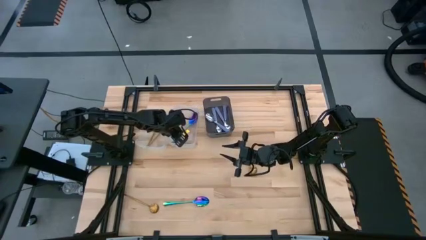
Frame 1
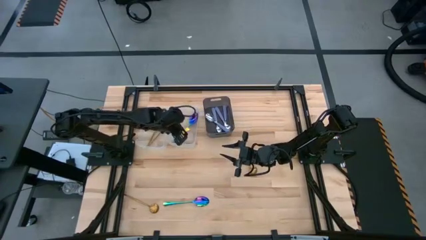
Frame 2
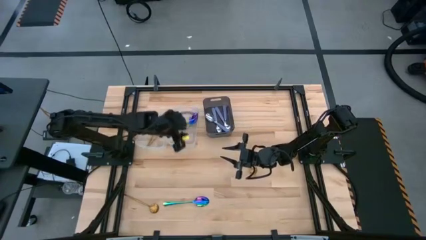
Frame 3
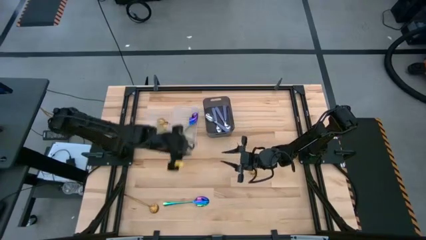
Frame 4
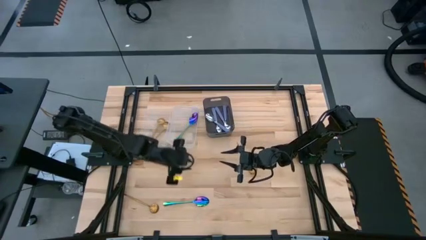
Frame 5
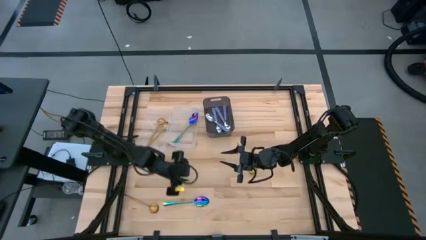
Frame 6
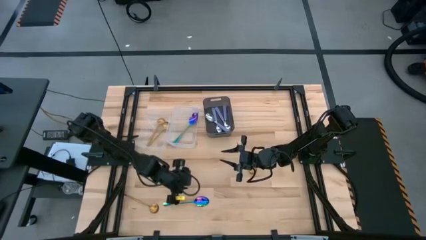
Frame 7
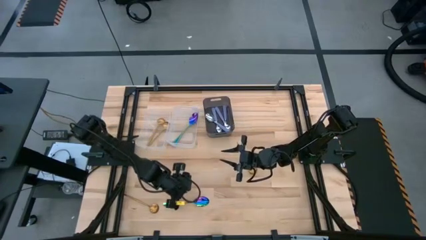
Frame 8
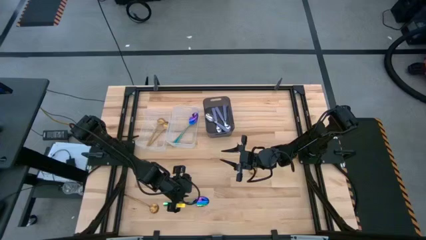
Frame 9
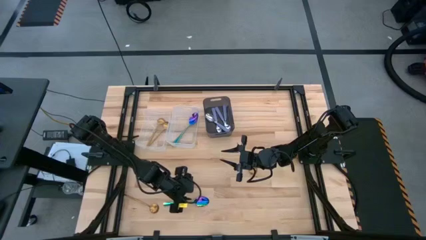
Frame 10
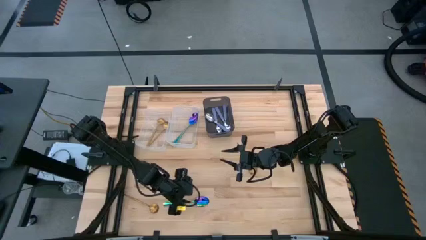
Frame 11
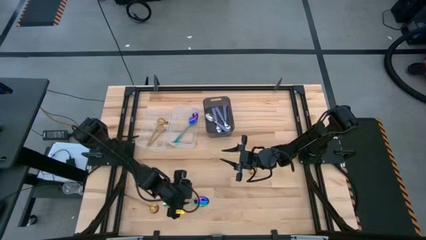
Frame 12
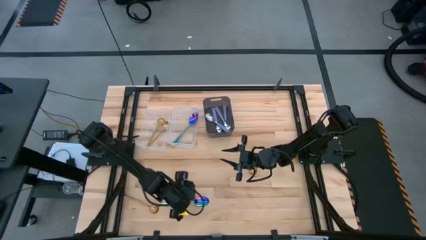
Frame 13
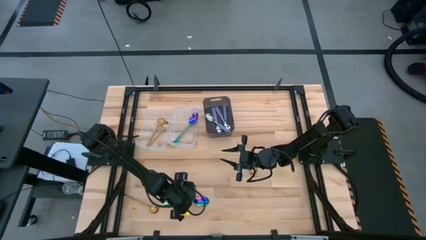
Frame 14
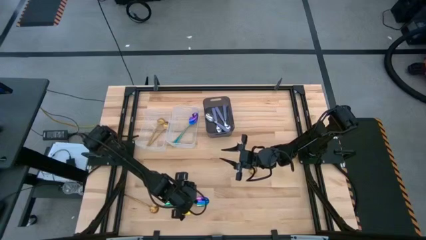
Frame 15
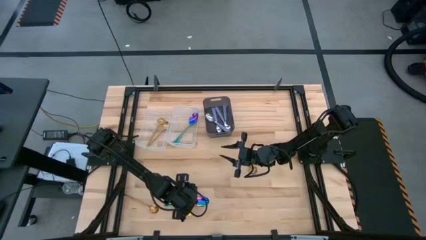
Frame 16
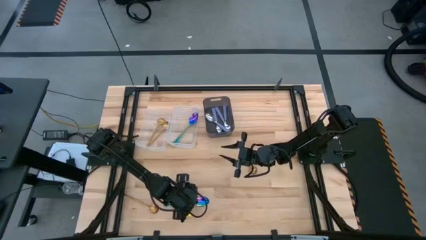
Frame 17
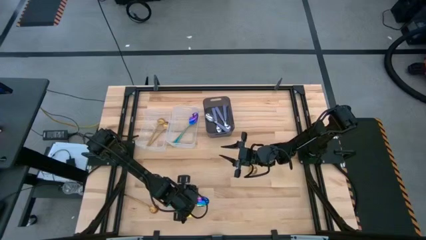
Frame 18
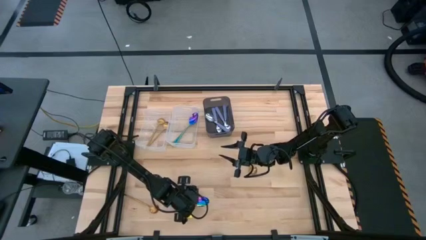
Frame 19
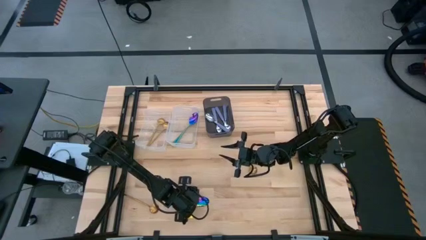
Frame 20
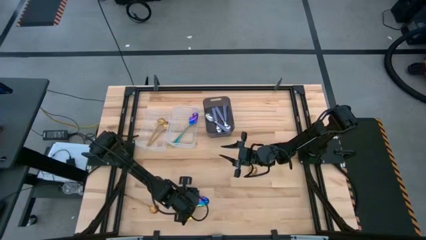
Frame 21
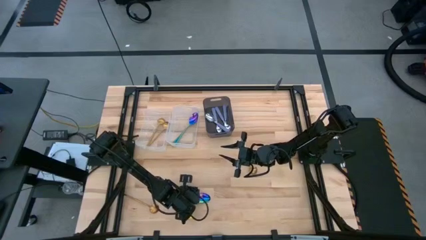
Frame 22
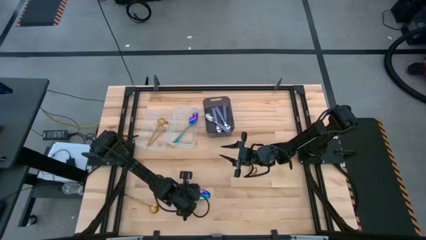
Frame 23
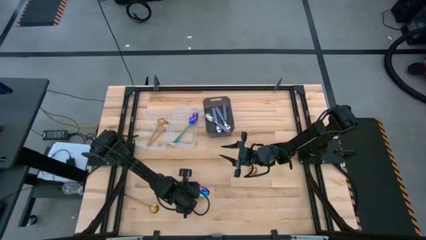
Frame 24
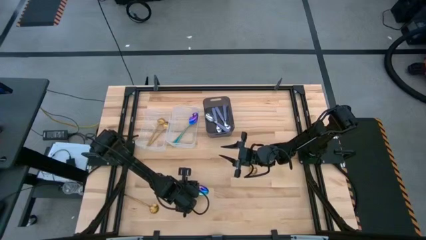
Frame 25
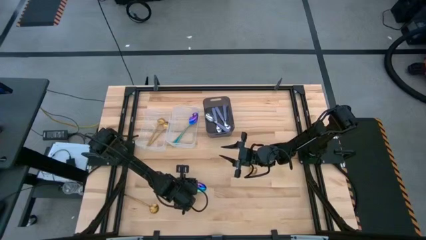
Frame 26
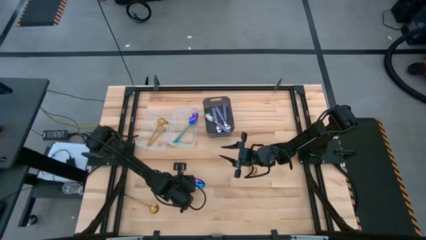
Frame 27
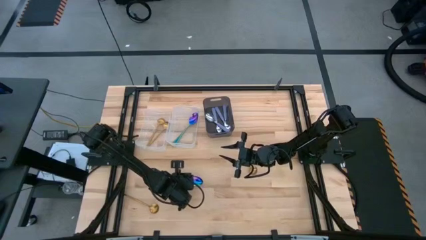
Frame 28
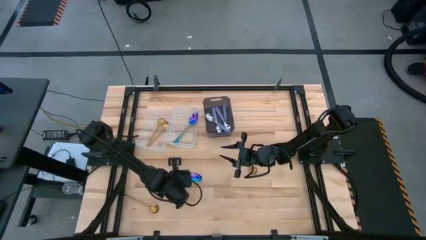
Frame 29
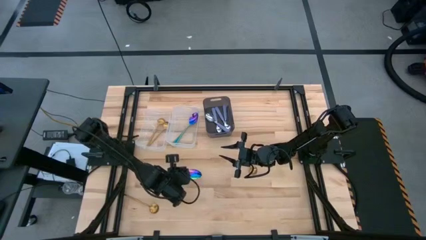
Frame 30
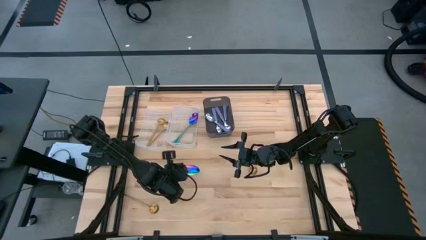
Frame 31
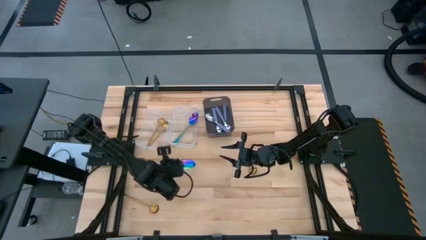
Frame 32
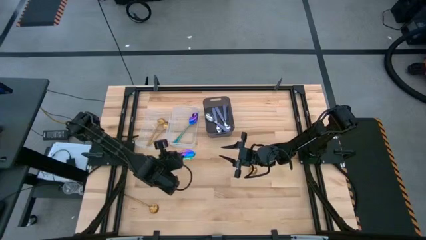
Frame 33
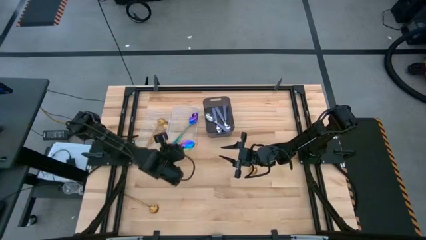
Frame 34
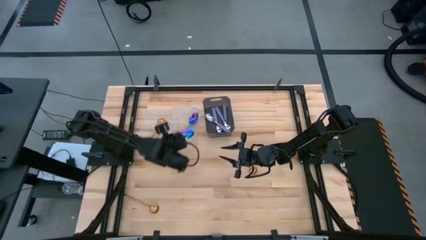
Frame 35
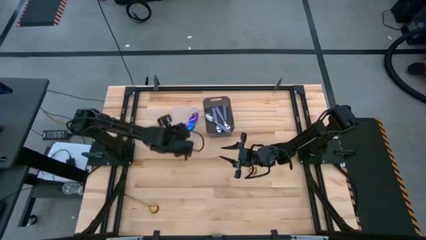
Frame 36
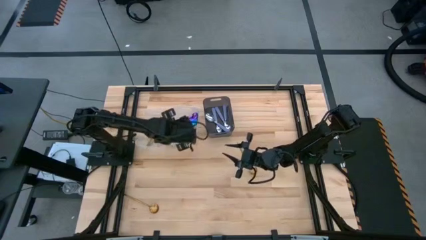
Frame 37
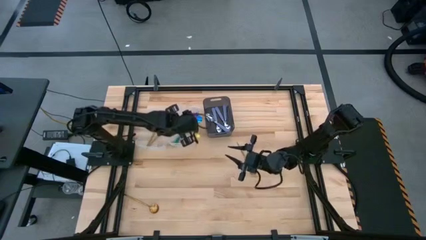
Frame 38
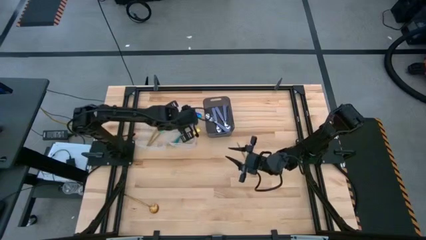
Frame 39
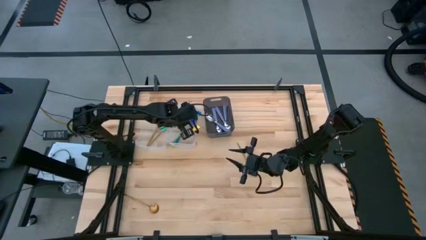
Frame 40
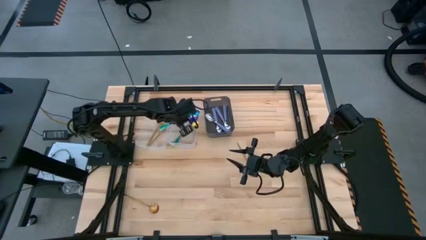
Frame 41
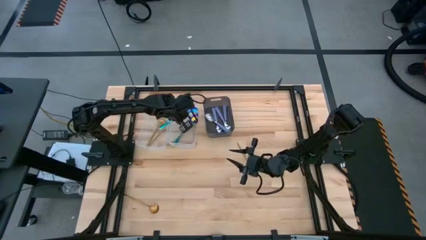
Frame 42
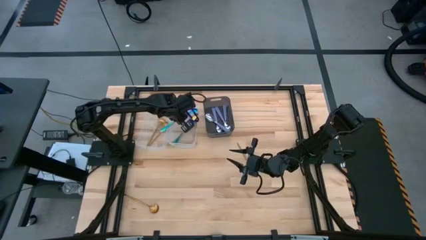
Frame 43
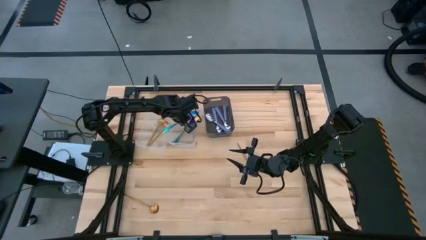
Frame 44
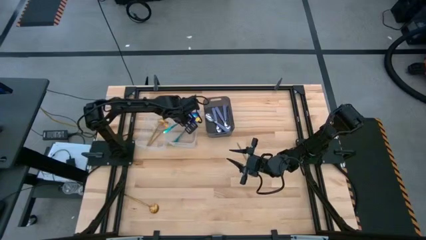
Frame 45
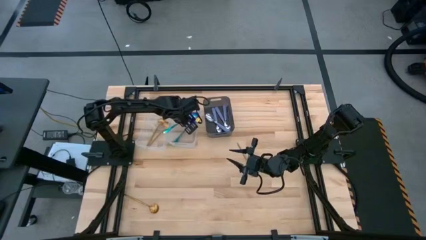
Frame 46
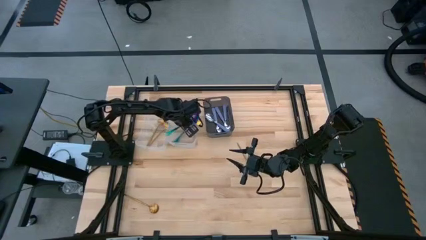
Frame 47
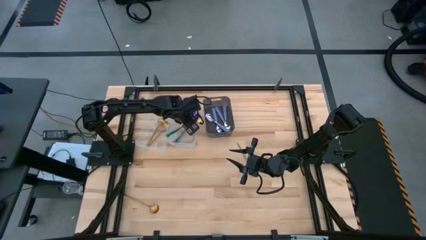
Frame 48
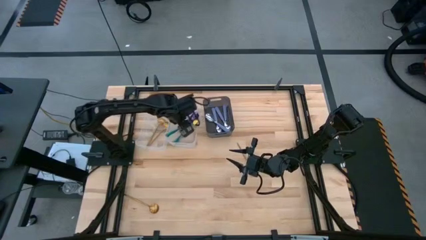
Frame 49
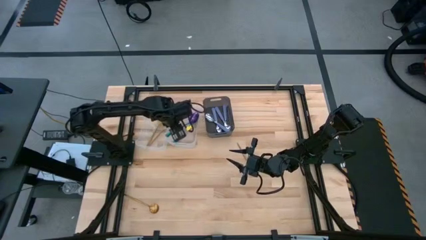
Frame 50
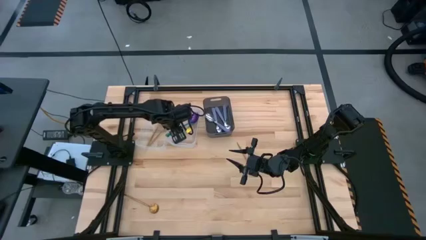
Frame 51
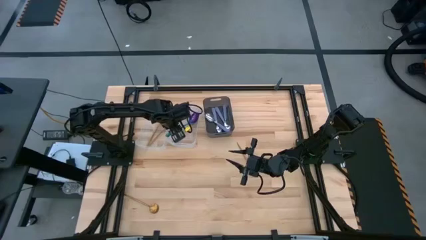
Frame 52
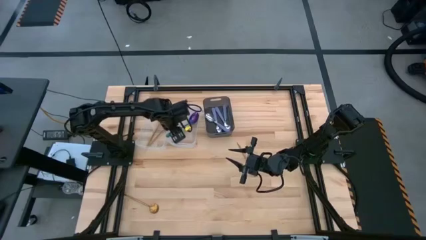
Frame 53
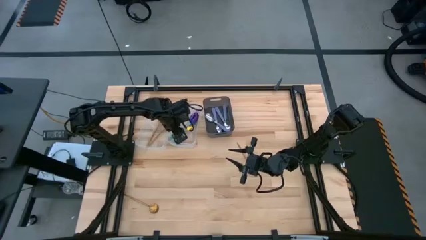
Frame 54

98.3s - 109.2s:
Task: Sort silverware by color (type)
Put the blue spoon into the right transparent bin

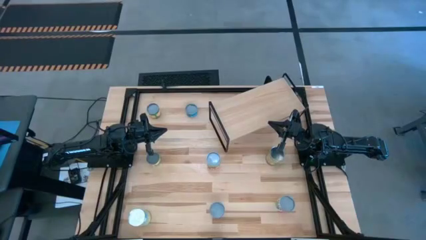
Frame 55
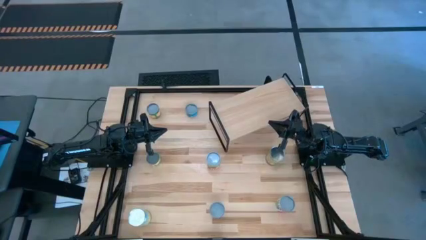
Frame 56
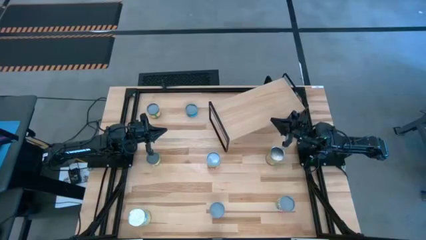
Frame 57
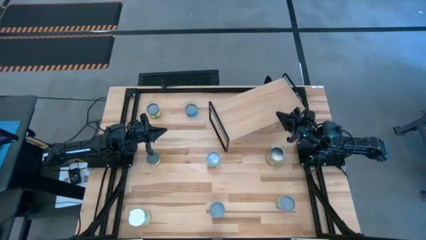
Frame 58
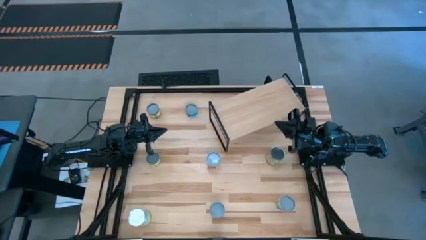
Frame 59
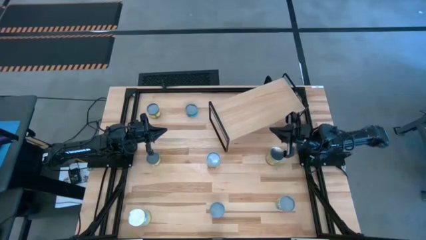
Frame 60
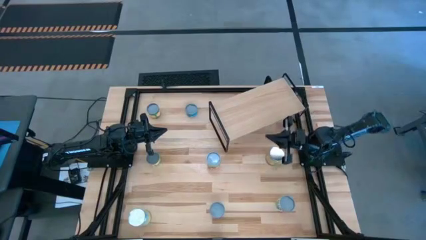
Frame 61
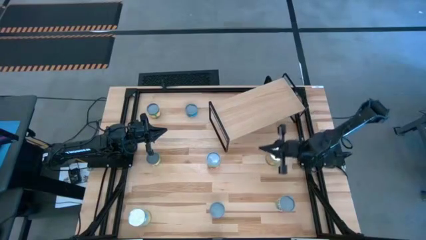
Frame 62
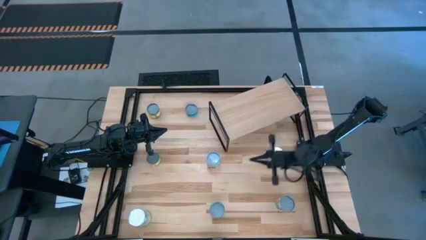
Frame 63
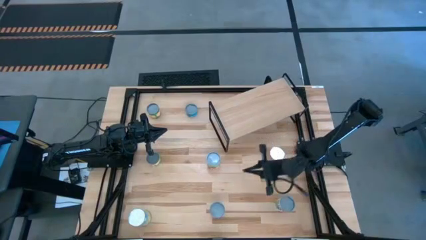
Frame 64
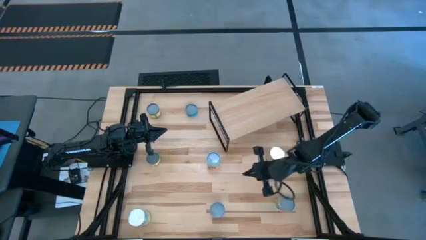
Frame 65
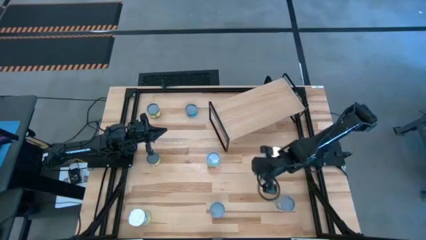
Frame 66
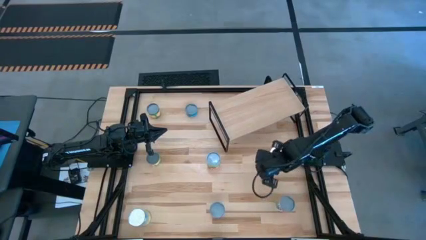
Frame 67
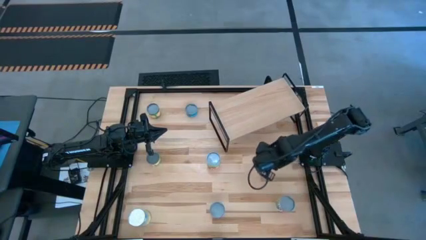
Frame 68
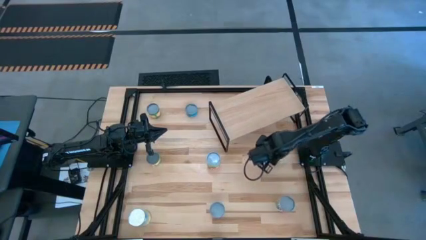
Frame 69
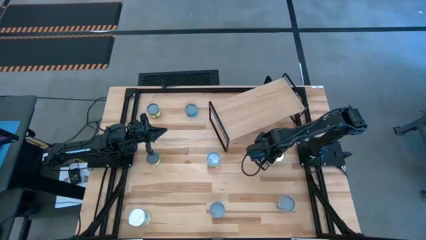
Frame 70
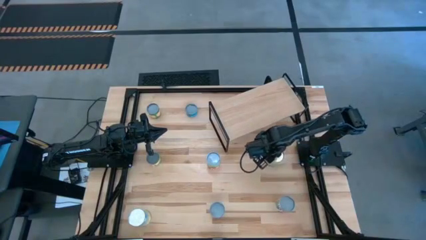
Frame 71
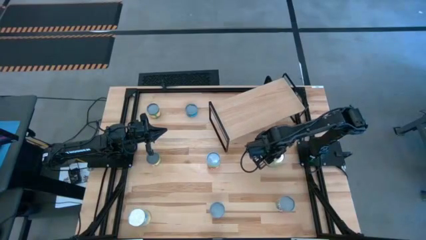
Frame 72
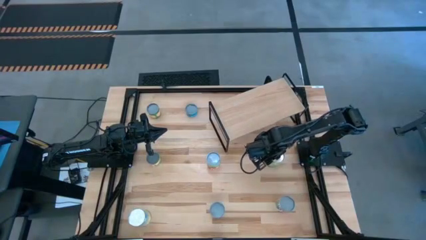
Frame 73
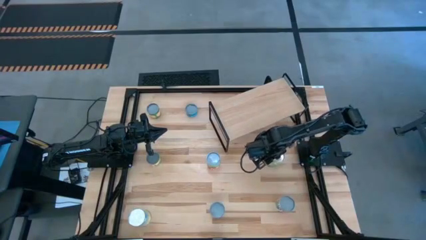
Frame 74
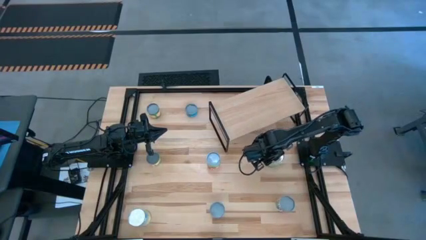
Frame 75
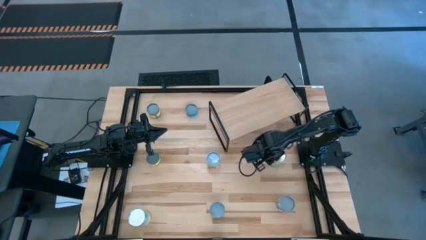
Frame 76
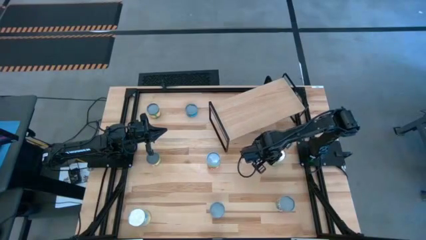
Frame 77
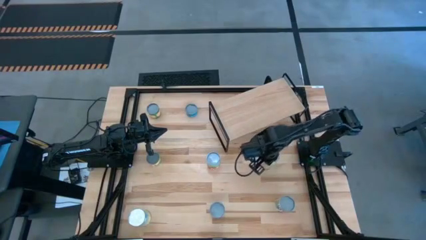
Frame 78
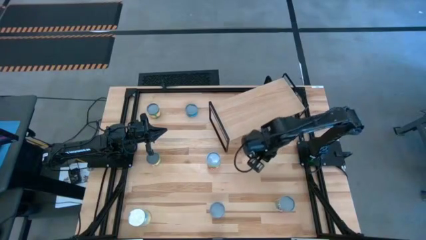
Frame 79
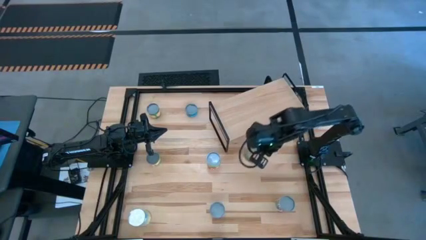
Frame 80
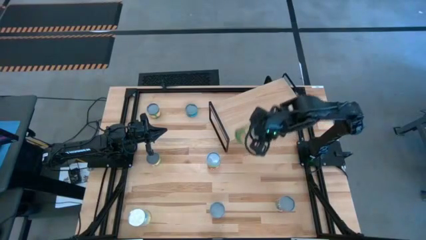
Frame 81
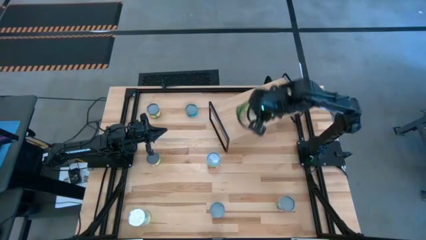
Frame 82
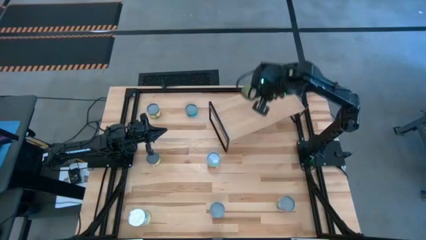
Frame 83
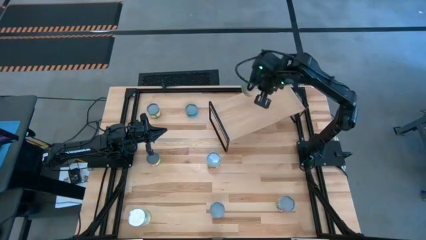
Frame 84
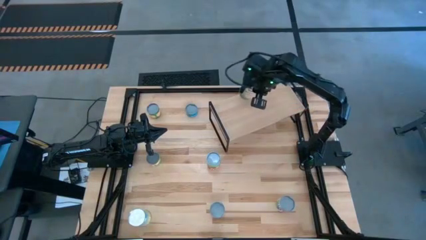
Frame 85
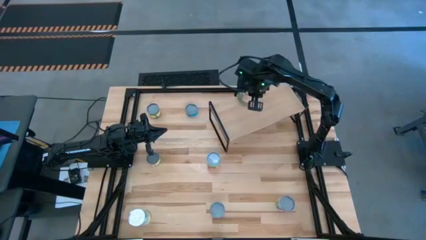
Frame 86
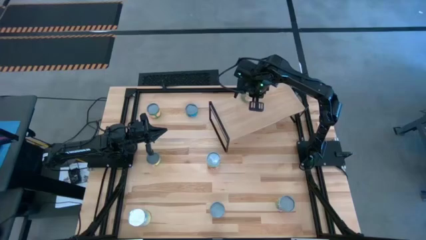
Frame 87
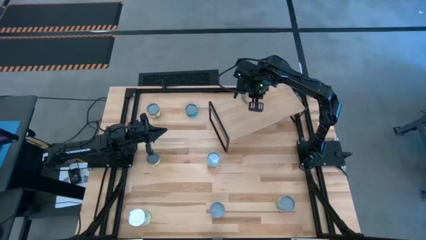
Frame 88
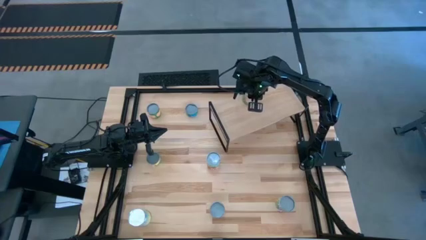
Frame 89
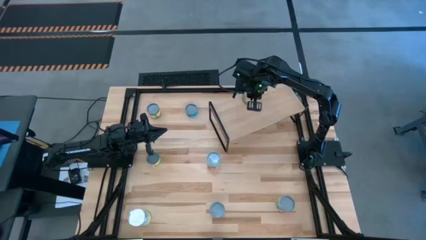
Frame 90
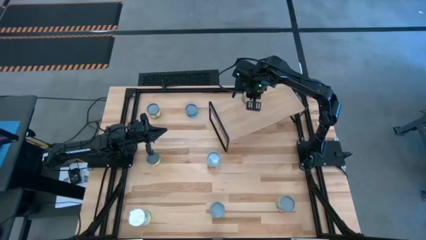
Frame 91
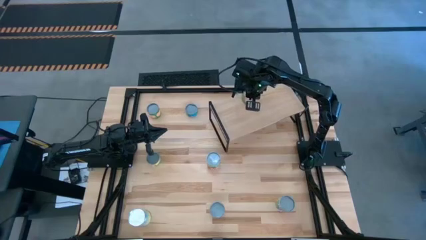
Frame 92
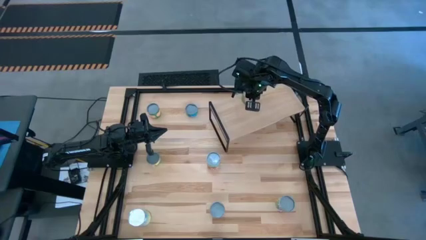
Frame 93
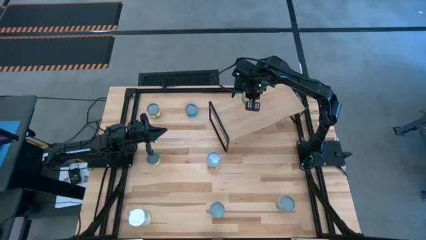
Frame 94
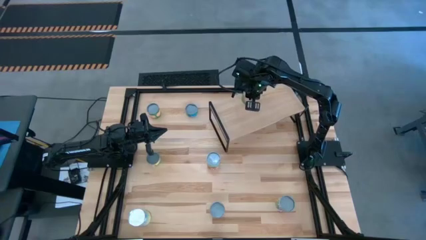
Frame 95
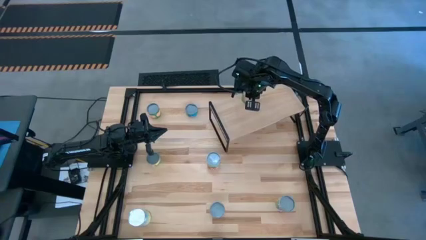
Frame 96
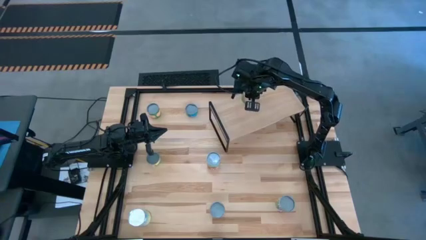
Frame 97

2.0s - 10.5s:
Task: Pick and place cans onto a shelf
Put the canned oranges on the shelf
